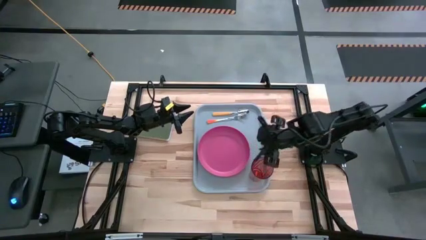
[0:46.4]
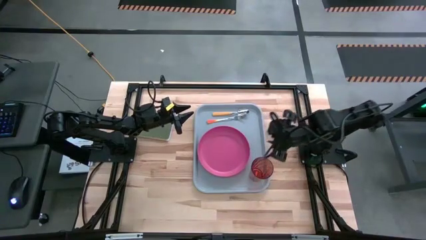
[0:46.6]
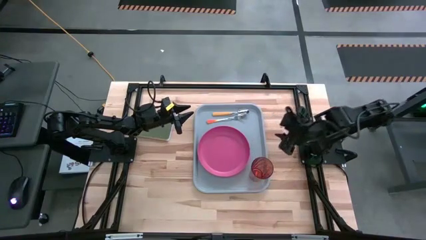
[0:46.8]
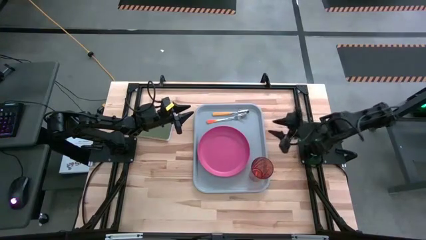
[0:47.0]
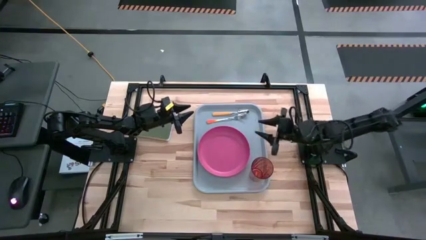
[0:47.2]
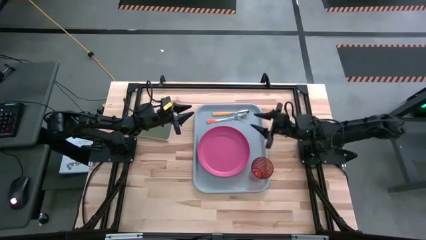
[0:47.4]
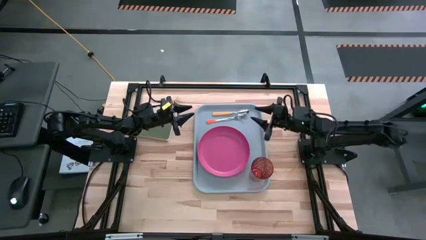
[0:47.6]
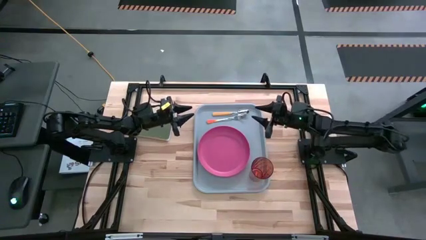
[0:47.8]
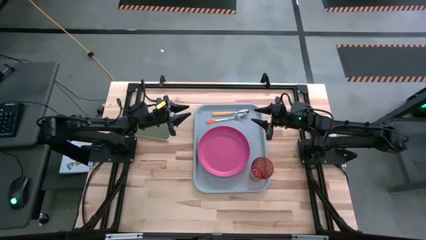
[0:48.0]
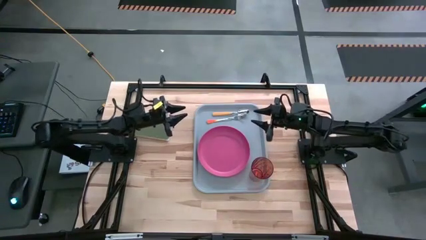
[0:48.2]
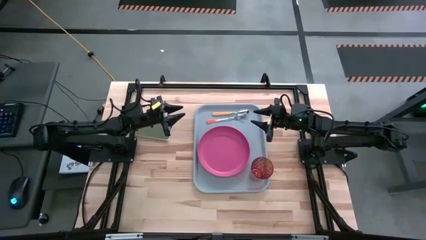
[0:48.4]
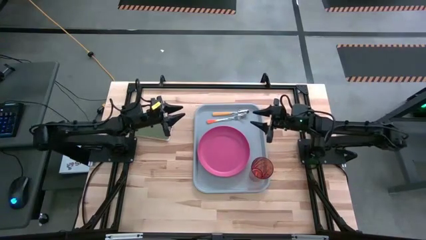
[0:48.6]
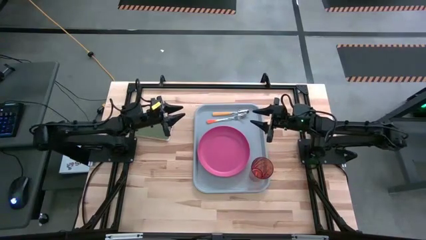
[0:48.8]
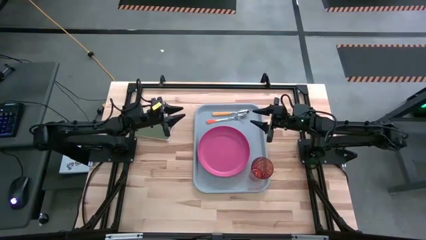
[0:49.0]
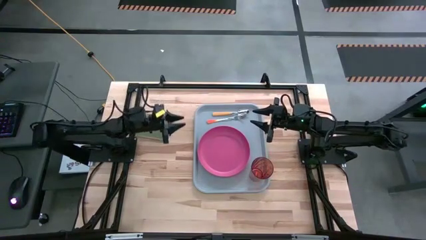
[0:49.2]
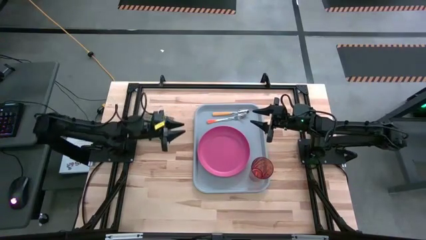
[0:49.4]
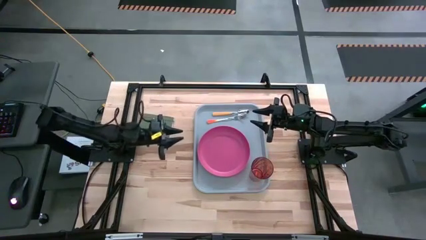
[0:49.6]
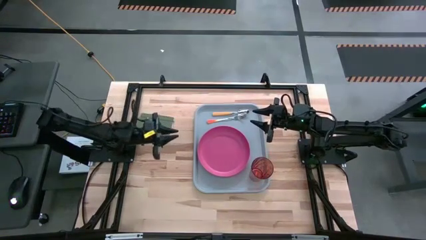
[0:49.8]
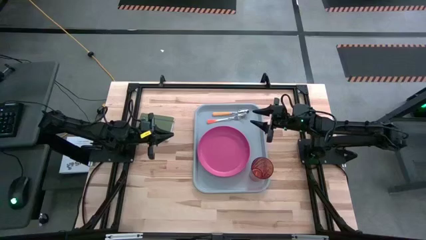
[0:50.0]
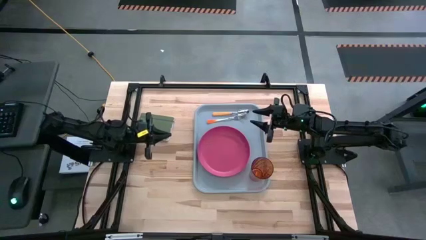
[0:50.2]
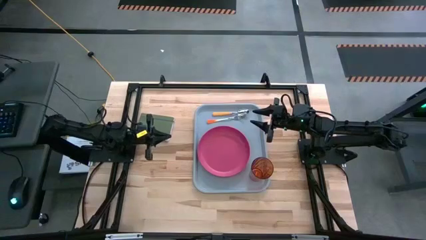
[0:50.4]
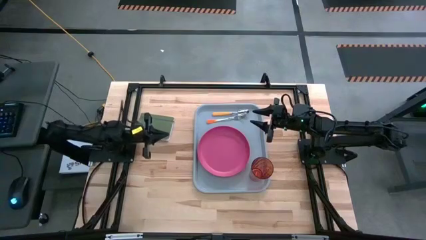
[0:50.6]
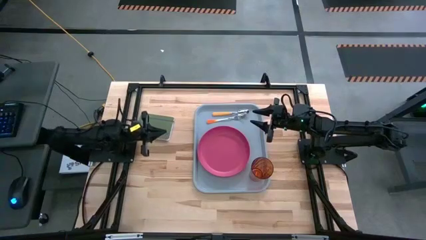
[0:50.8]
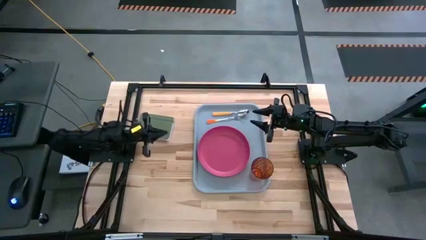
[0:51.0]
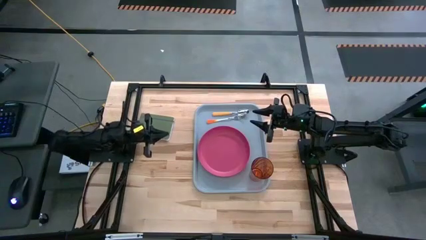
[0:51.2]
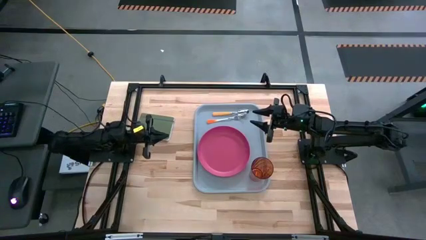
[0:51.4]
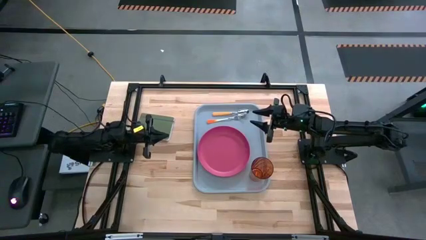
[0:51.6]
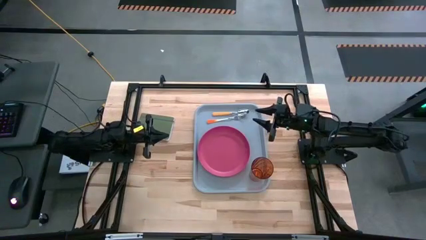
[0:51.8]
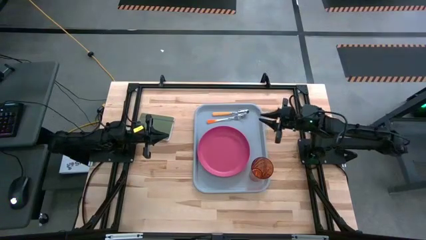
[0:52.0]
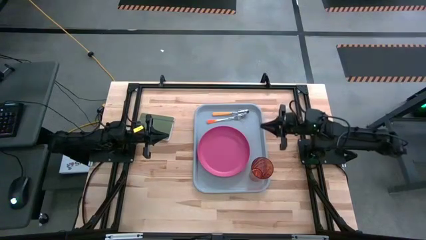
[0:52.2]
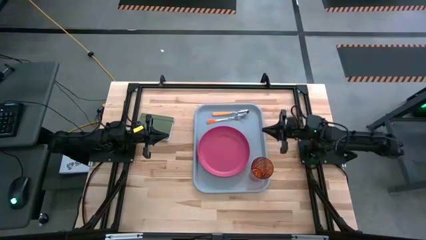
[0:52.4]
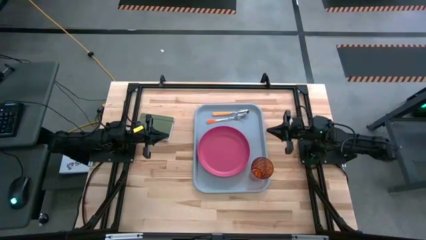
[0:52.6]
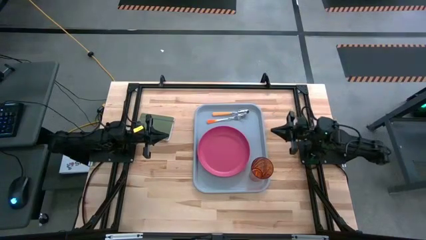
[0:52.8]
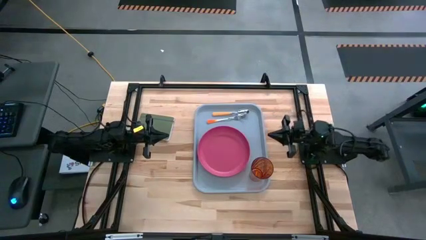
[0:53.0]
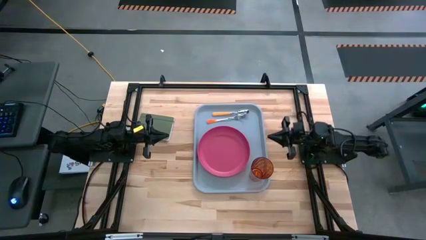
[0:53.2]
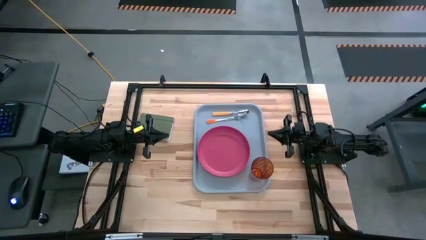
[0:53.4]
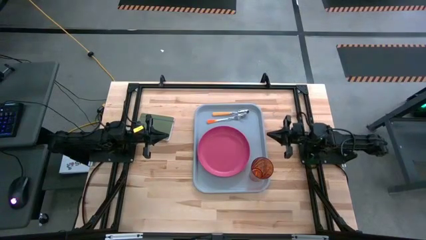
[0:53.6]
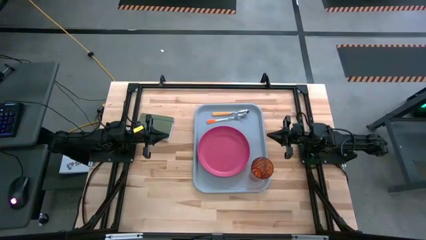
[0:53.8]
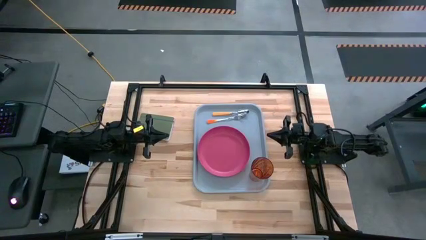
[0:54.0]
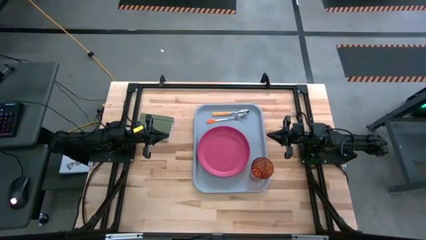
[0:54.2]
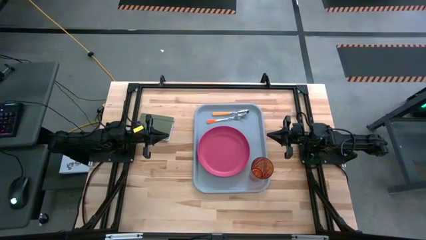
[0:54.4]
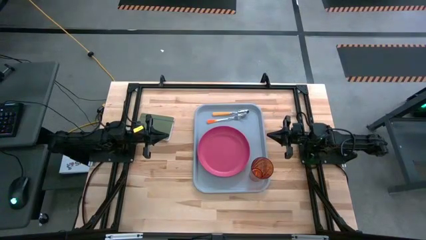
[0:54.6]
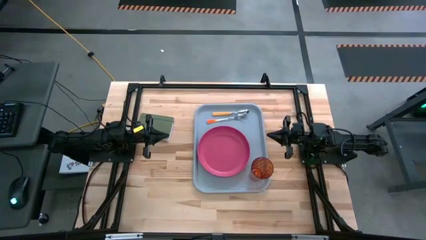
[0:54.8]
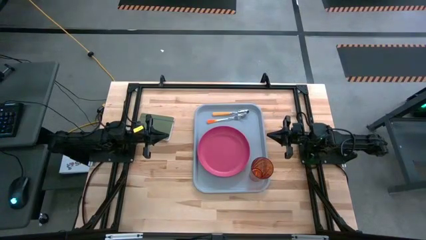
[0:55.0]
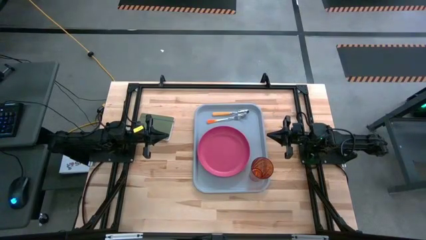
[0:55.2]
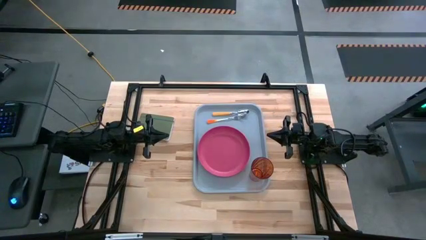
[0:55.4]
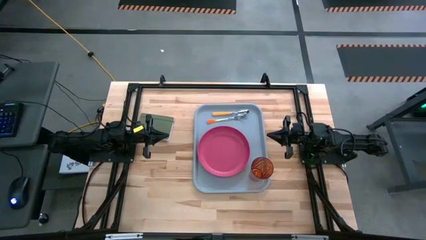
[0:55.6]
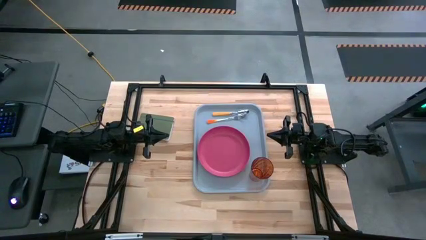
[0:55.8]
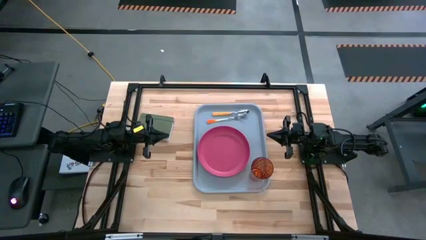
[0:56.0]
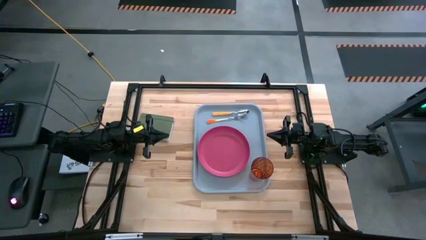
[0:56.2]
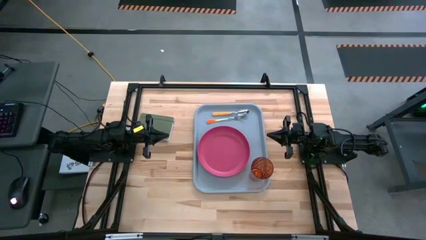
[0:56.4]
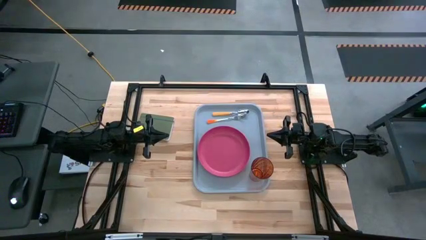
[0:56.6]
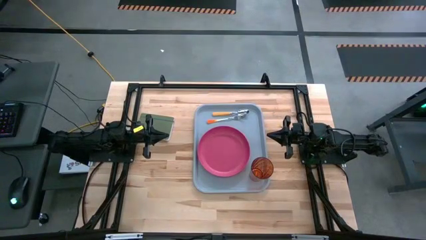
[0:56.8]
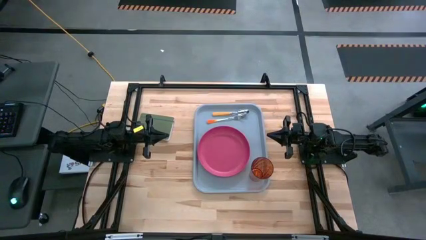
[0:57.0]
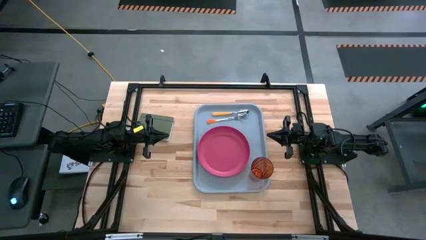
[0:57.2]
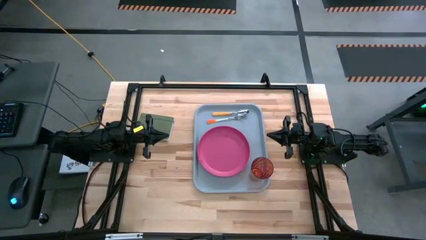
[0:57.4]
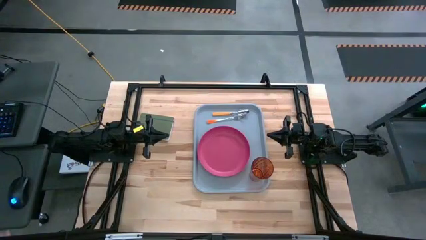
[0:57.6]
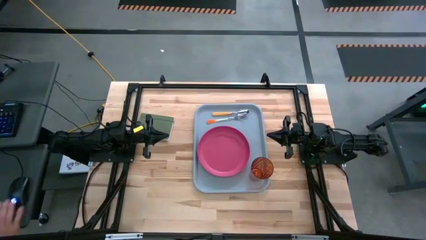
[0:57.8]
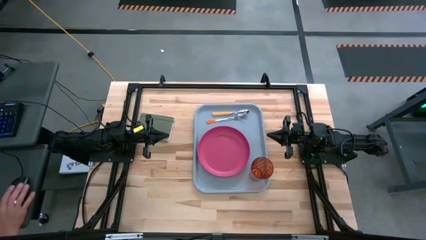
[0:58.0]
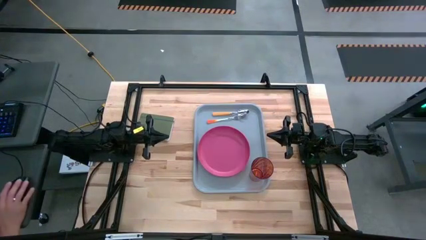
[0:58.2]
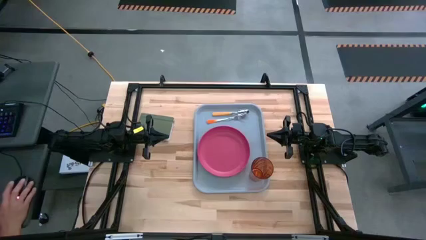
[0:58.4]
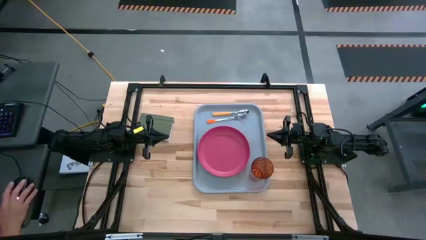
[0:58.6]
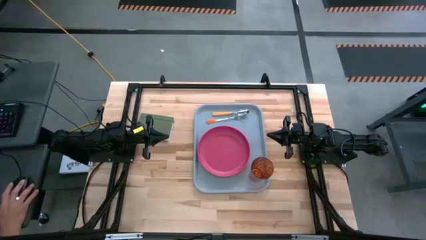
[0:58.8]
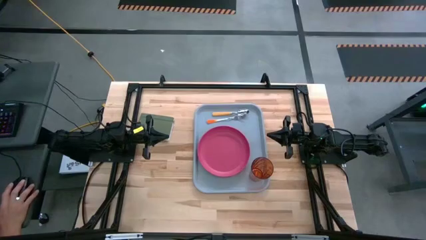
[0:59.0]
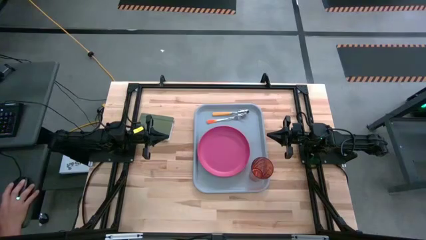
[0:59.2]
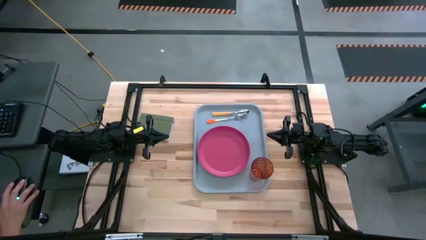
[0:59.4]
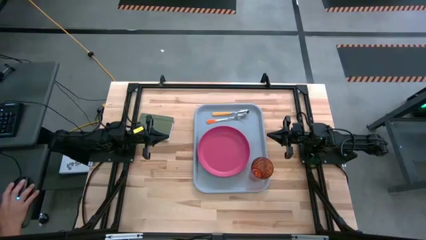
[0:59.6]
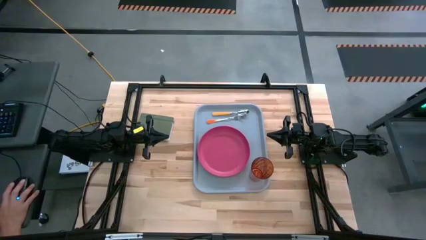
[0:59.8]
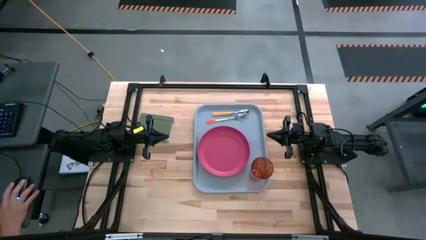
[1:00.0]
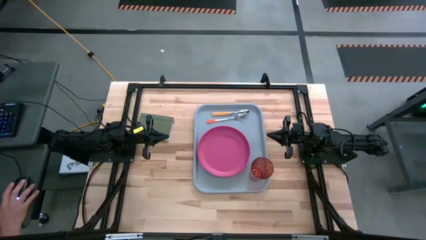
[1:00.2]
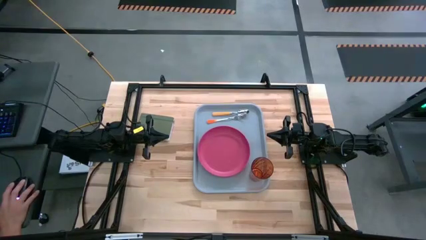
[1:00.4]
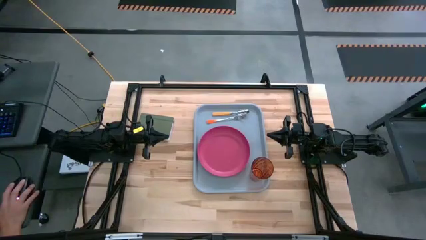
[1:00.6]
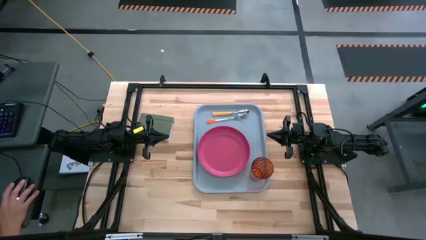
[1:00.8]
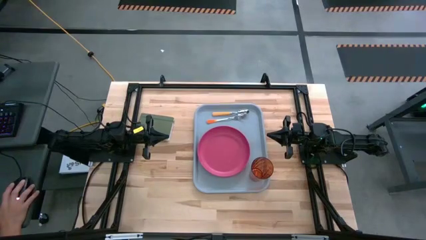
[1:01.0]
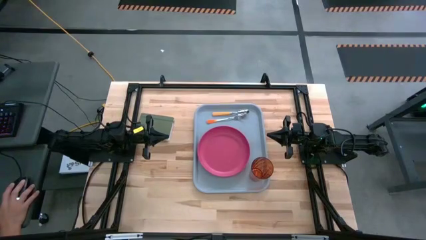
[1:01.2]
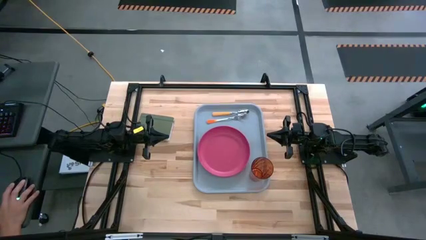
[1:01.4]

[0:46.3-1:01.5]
Task: Pick and place plate/cup/fork/spoon on tray
Return to Home Position

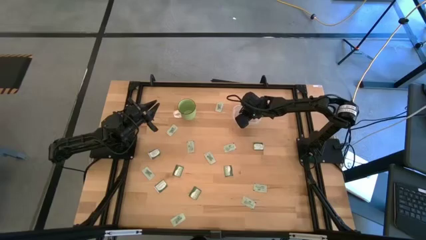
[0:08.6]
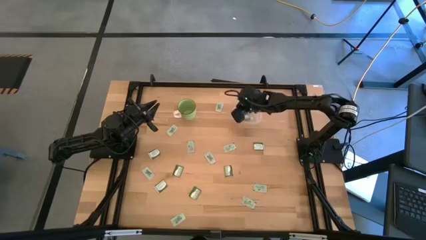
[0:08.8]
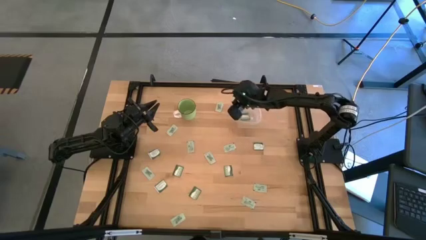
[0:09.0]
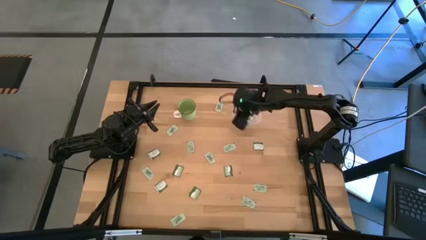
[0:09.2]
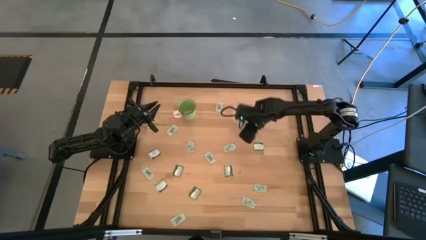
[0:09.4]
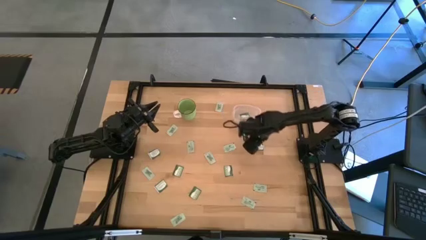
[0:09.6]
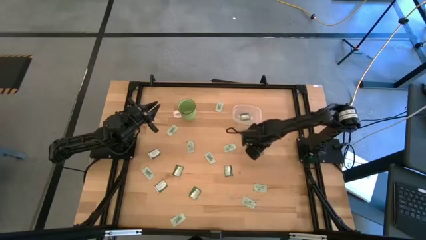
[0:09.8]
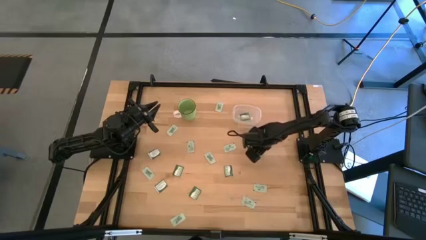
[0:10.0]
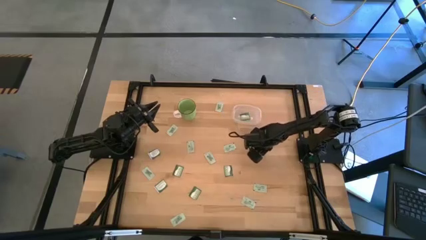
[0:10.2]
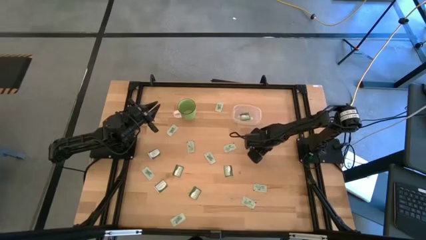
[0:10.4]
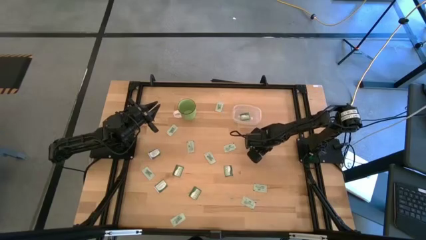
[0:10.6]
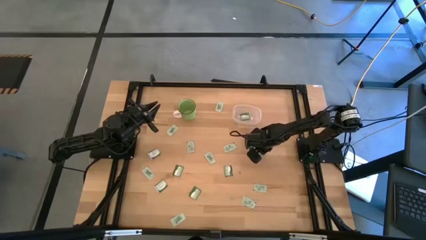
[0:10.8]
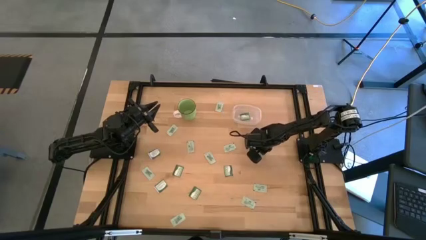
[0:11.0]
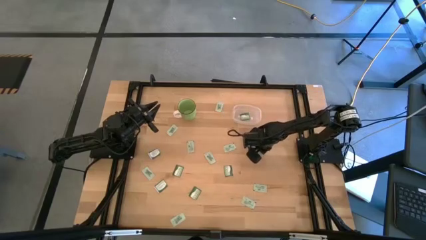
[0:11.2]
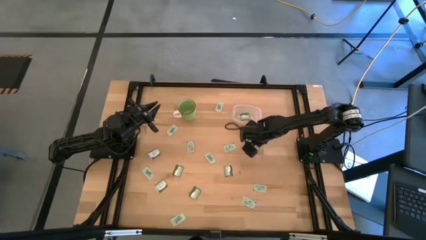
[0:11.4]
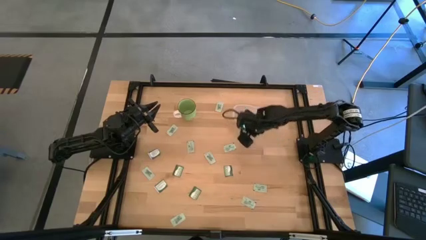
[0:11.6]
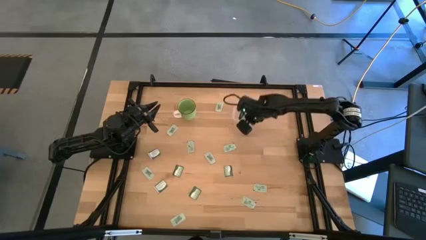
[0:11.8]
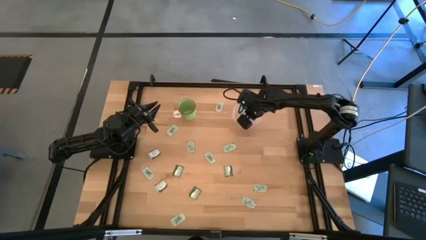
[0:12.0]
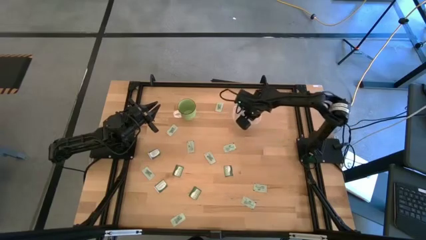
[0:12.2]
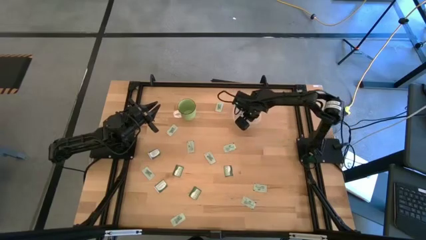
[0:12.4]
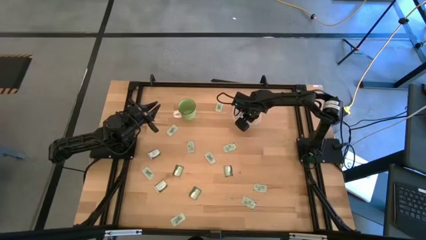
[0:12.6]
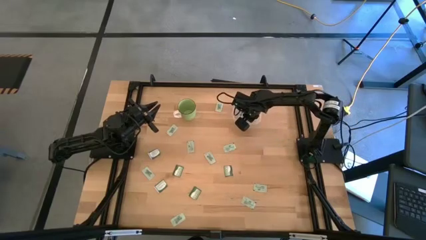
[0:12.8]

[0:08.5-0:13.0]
Task: Pick and place items into bin
Put the green truvia packet into the transparent bin
